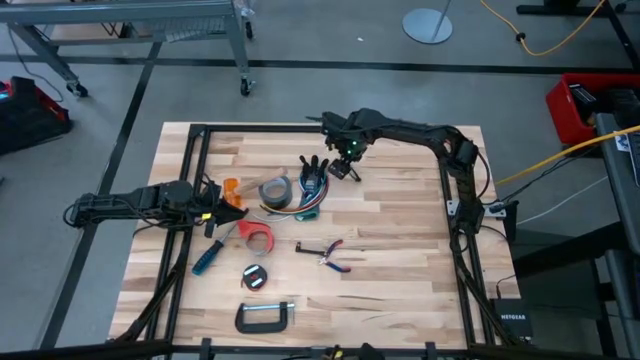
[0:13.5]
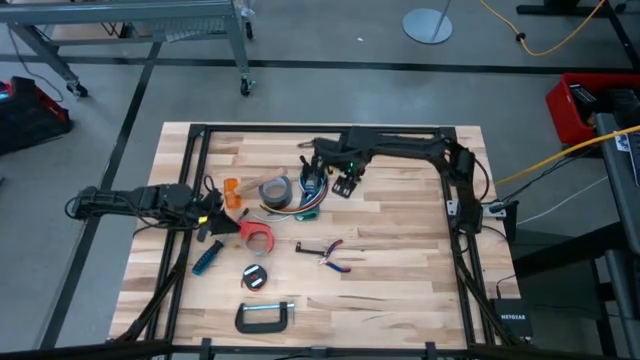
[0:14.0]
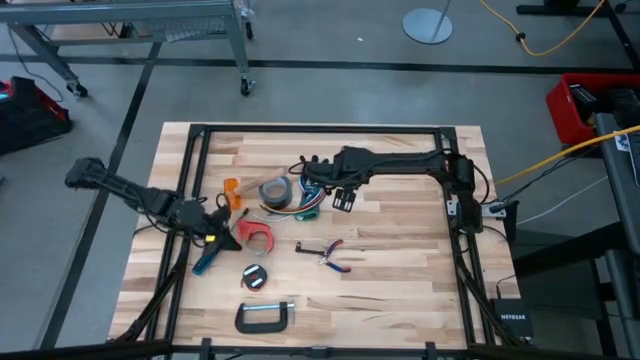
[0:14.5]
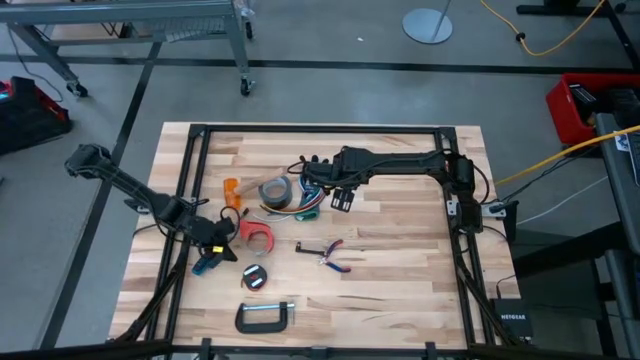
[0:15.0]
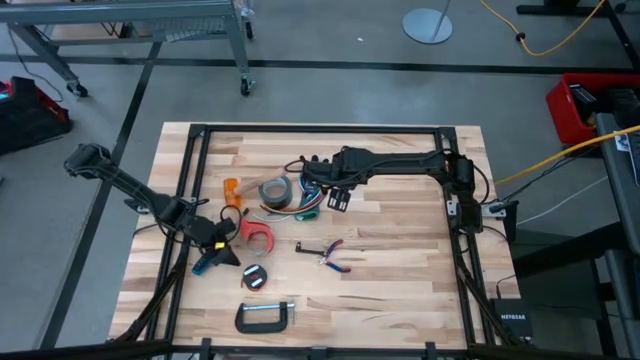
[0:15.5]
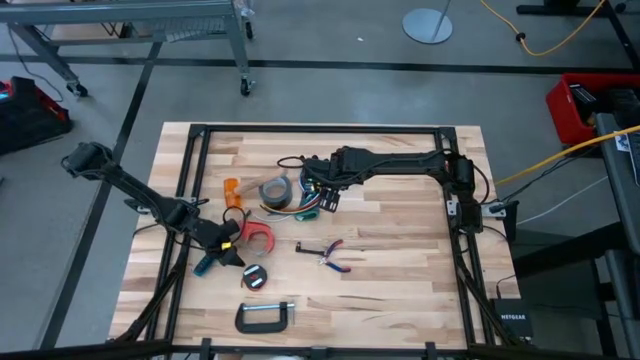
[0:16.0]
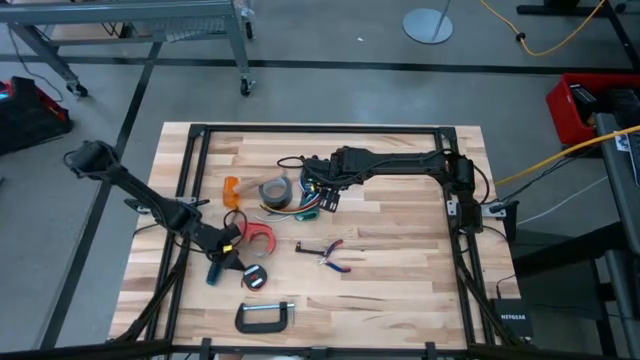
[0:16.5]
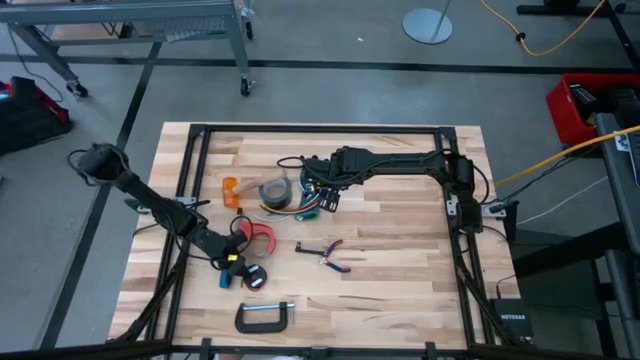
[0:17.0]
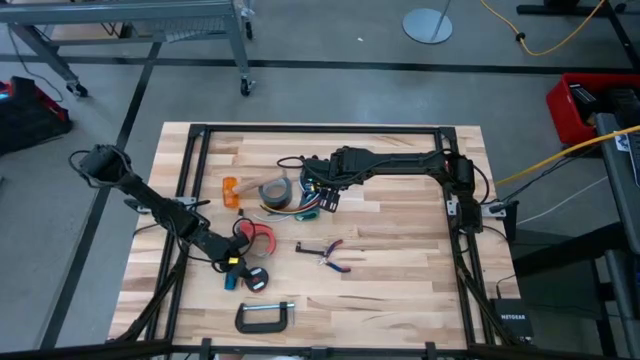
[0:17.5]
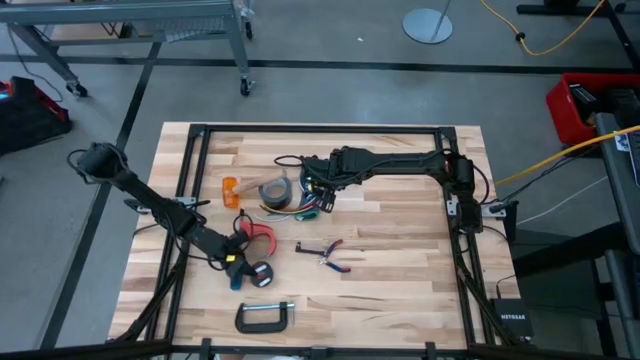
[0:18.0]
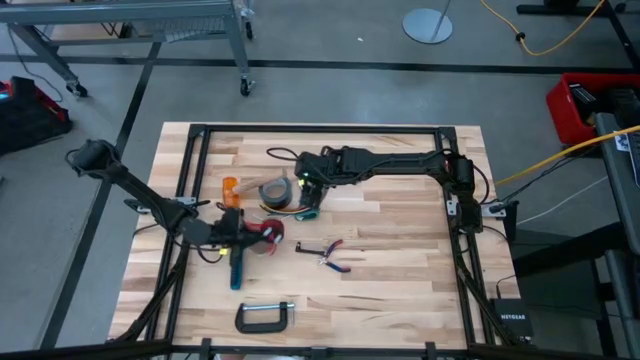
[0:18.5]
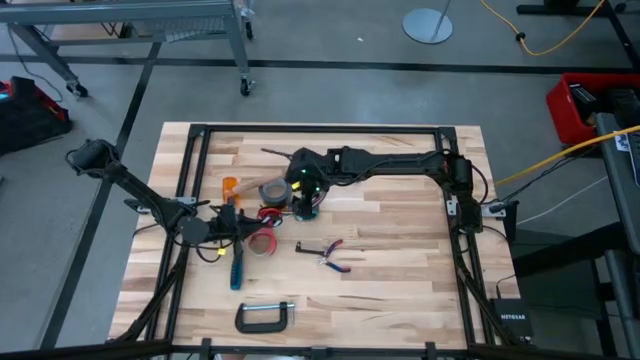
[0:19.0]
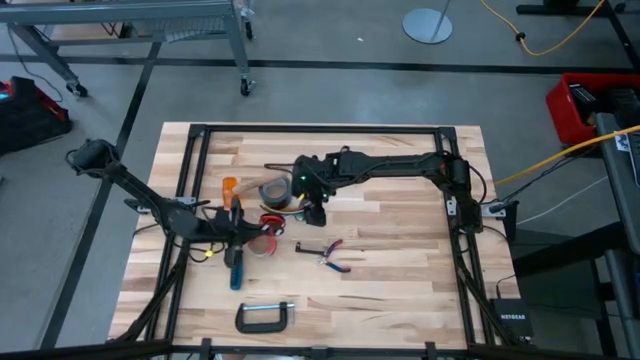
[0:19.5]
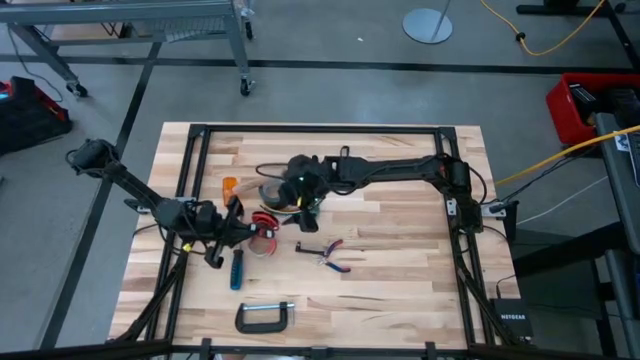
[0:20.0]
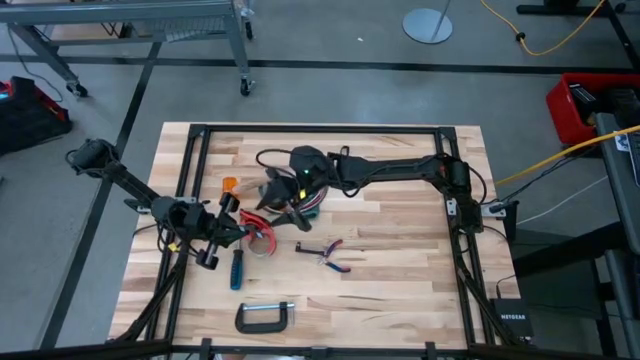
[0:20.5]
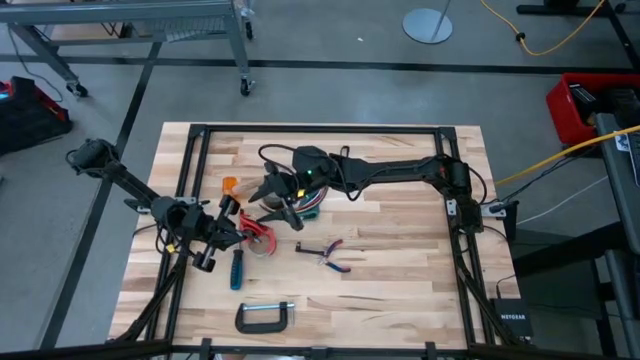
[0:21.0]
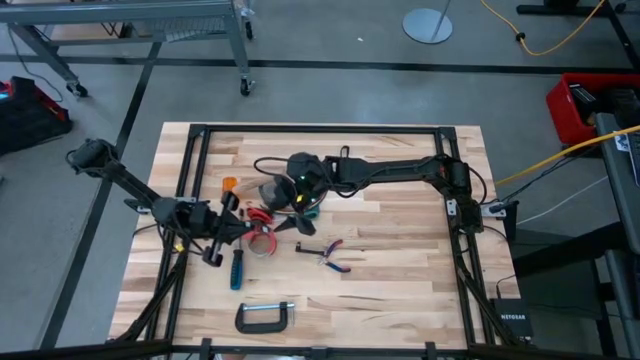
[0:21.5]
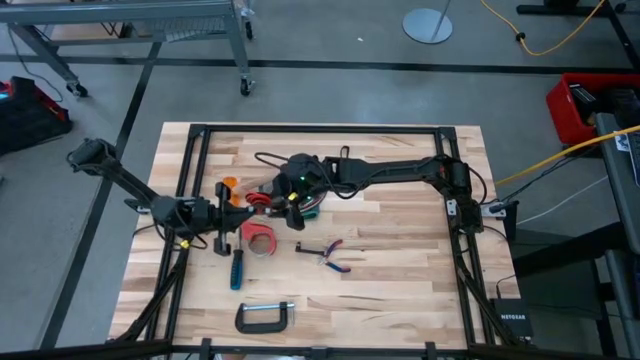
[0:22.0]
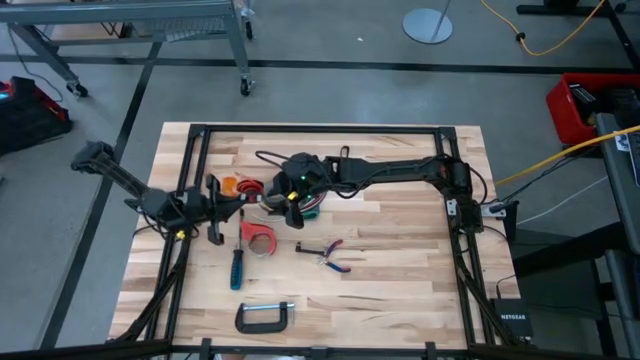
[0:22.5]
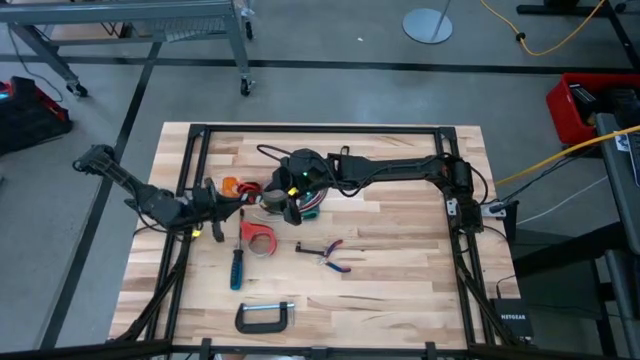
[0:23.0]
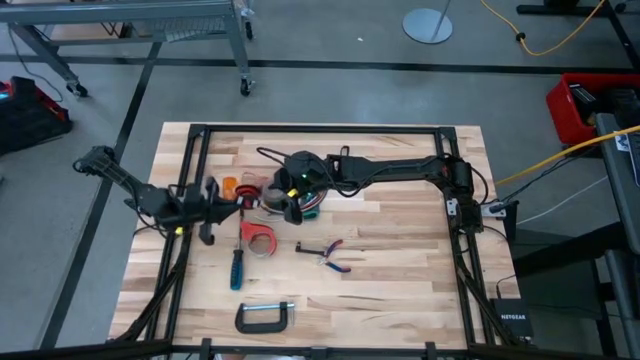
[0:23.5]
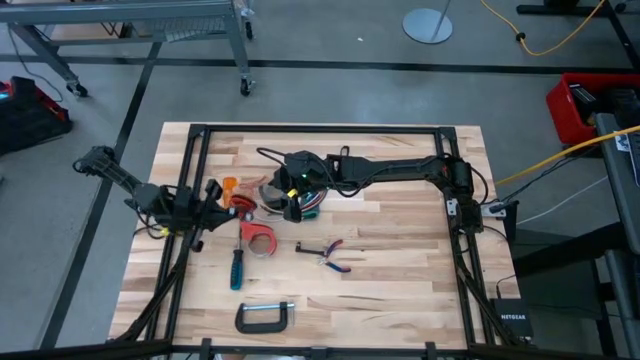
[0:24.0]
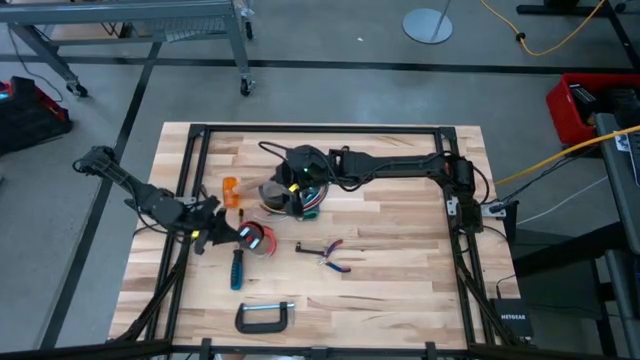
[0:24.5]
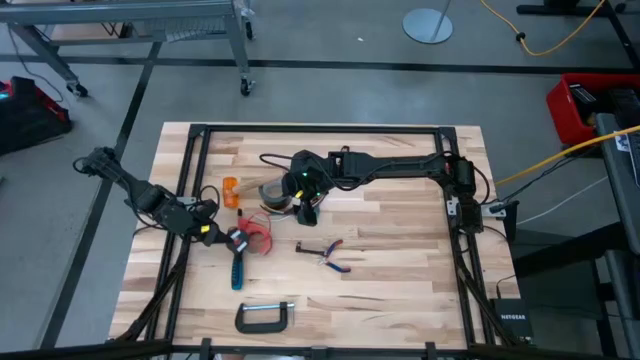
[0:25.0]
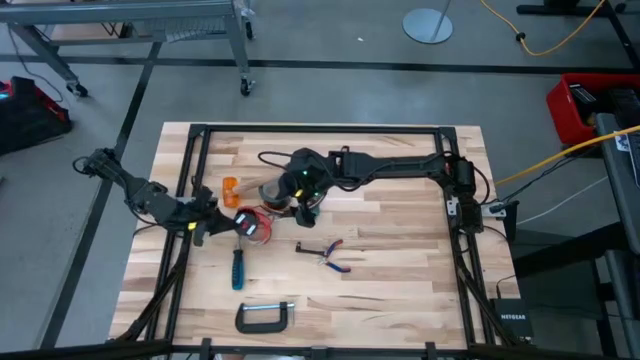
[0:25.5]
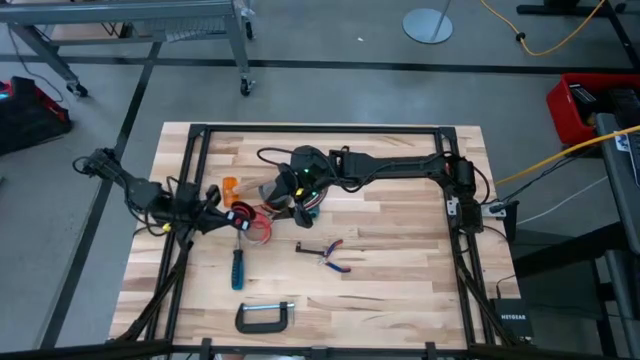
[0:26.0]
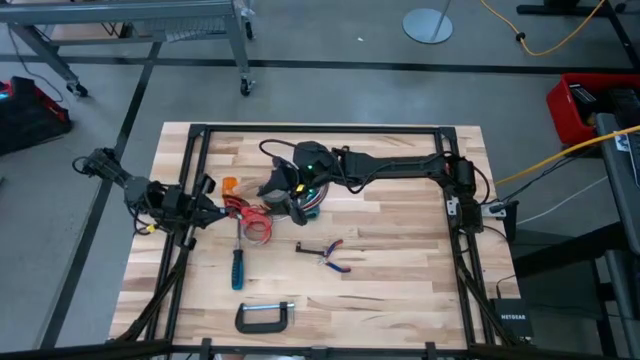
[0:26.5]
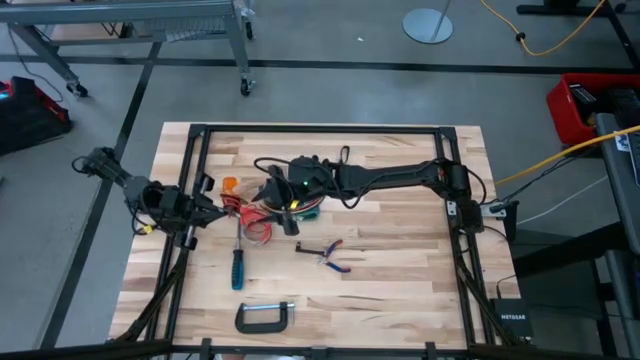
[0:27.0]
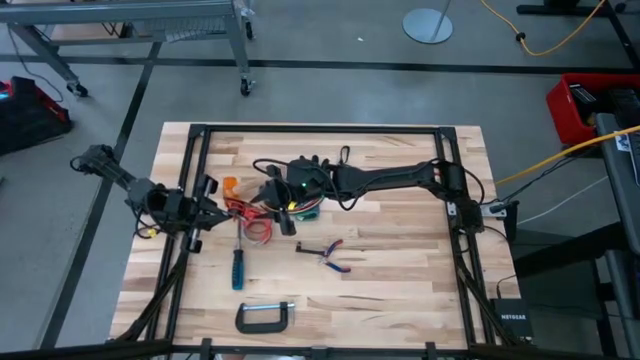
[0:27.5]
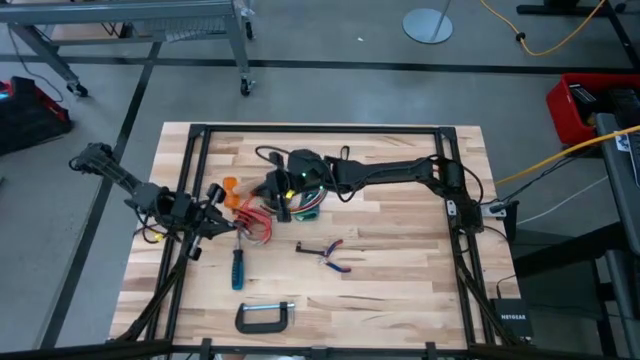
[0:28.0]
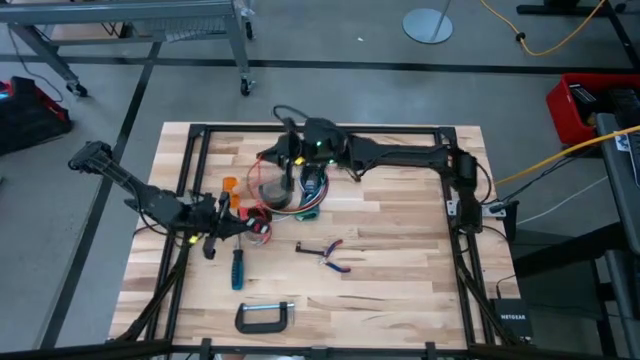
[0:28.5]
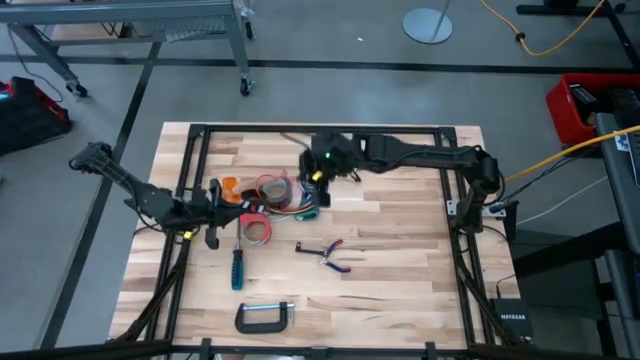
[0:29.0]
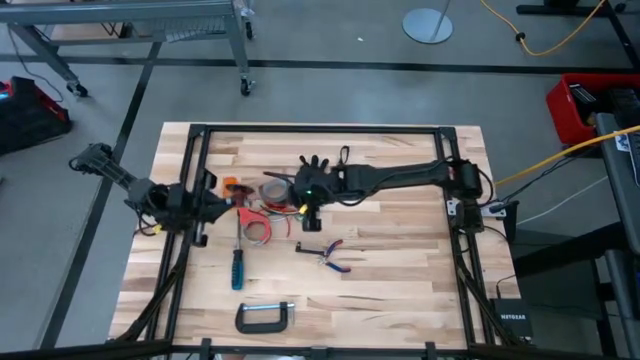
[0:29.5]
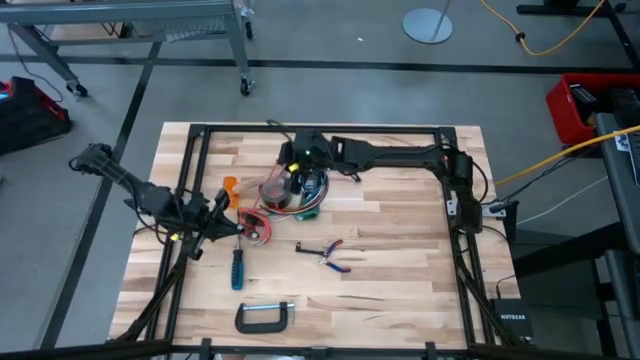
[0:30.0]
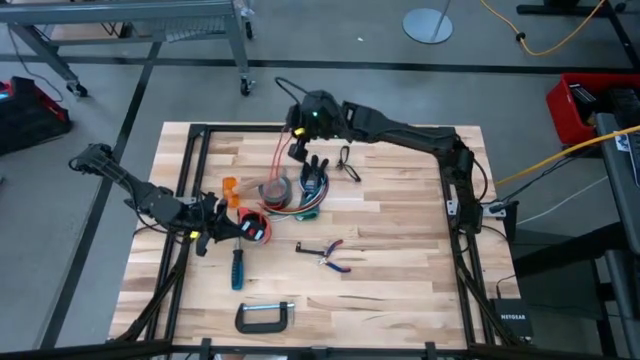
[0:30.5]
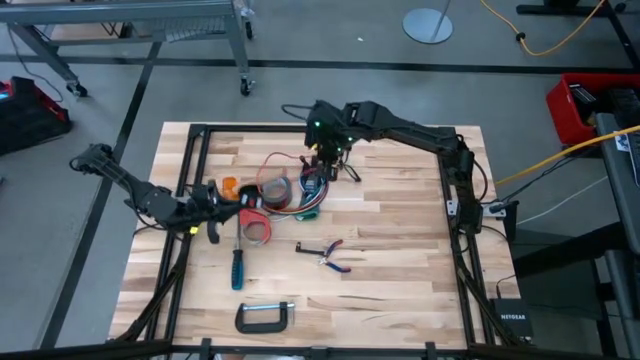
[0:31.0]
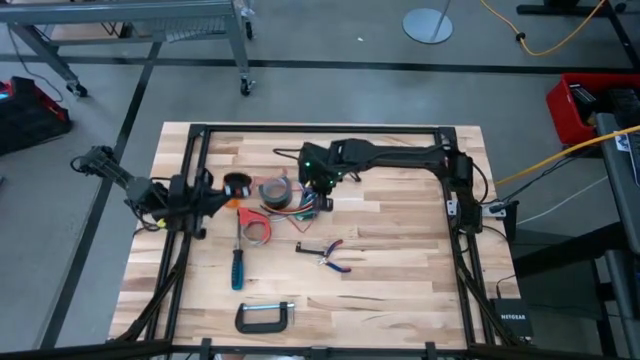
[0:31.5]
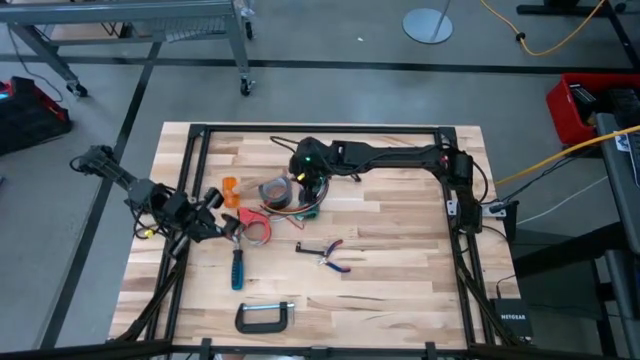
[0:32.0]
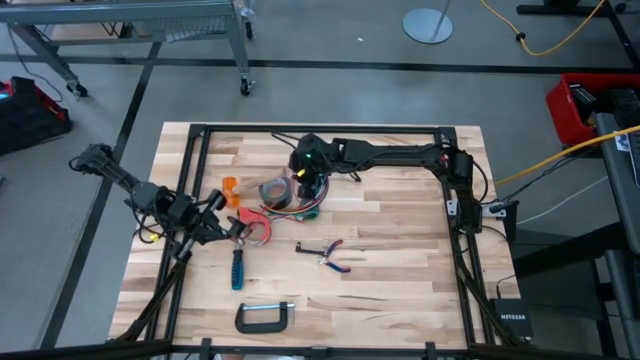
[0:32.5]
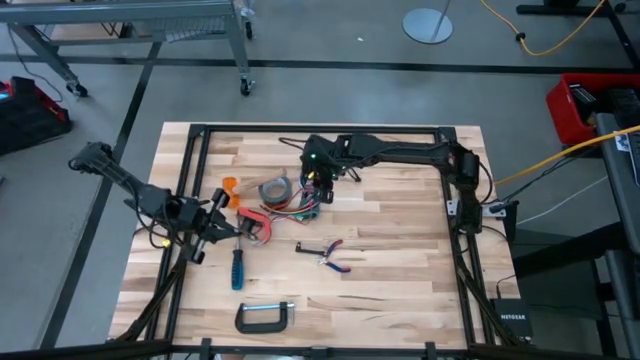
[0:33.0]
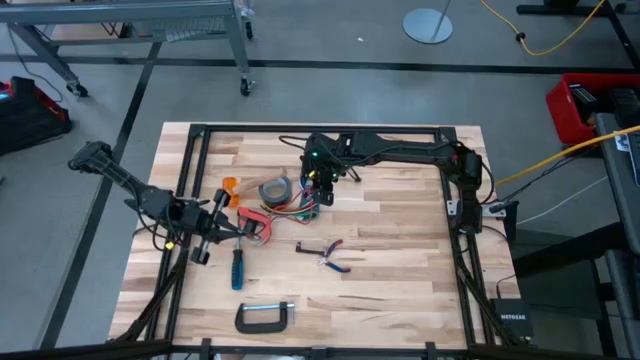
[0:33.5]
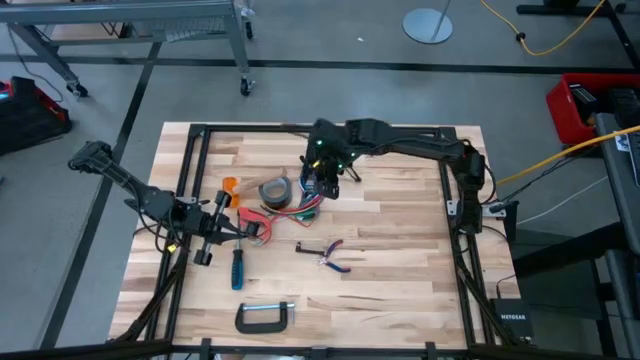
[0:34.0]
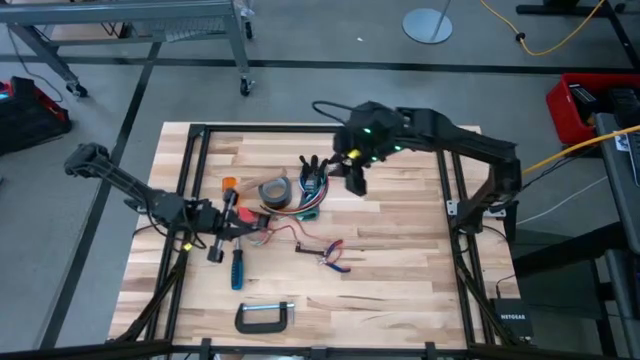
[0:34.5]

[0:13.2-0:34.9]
Task: Coil cords
Uncoil the red wire from the black spool
